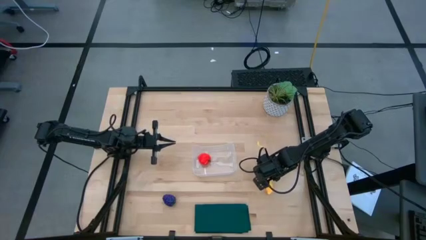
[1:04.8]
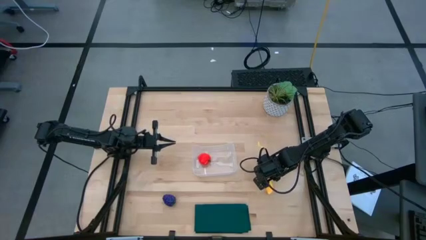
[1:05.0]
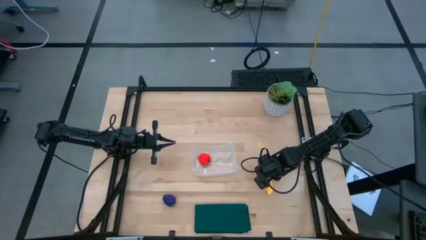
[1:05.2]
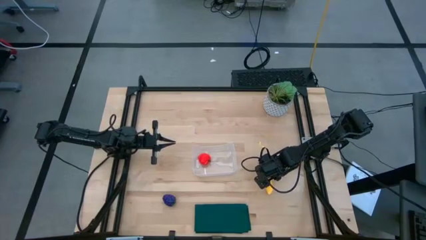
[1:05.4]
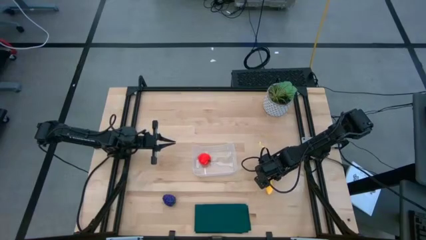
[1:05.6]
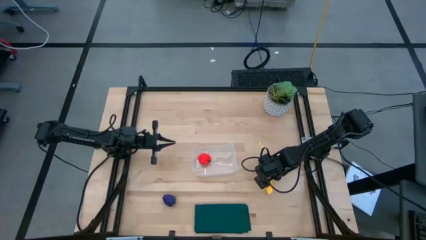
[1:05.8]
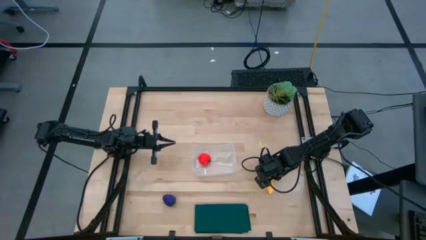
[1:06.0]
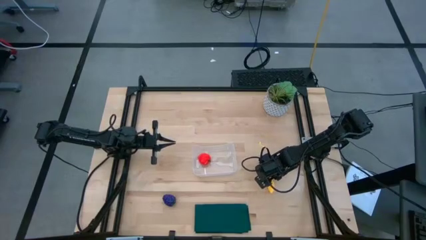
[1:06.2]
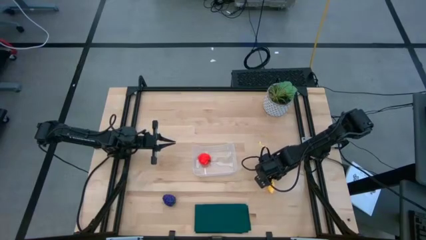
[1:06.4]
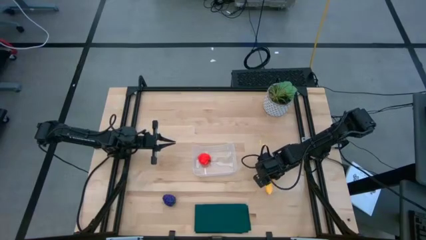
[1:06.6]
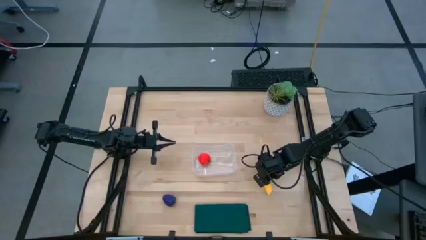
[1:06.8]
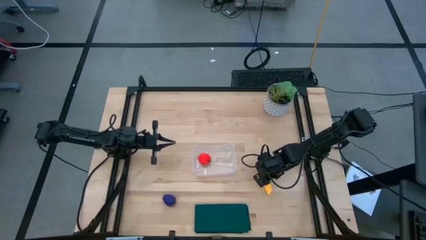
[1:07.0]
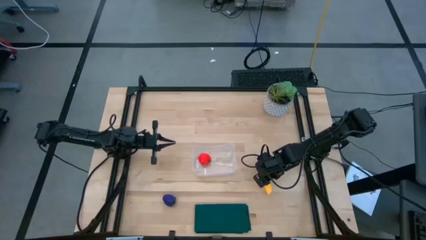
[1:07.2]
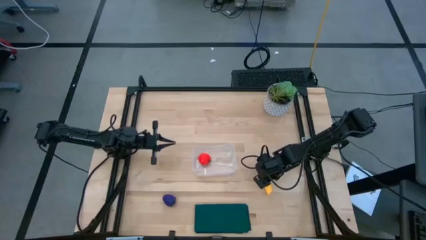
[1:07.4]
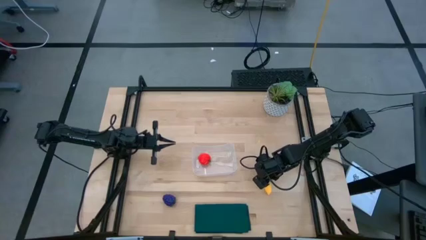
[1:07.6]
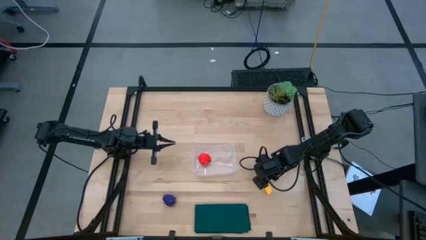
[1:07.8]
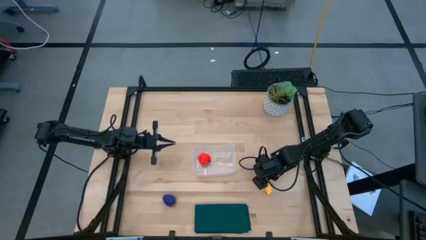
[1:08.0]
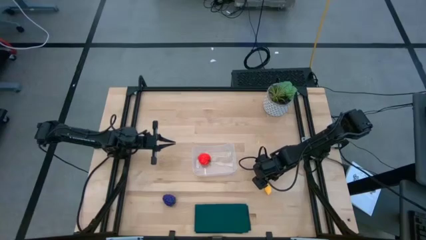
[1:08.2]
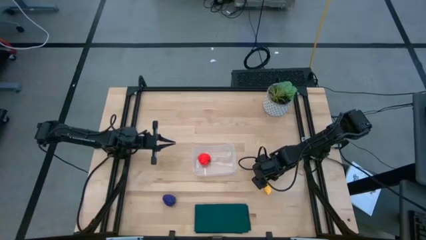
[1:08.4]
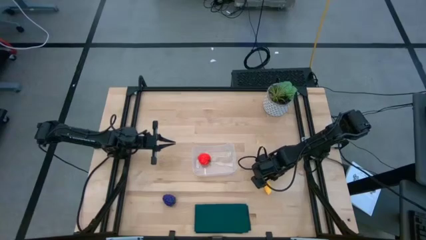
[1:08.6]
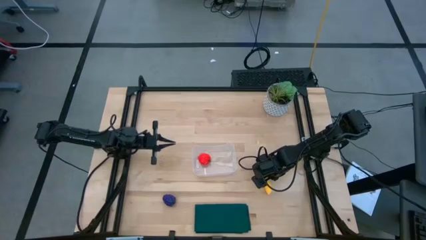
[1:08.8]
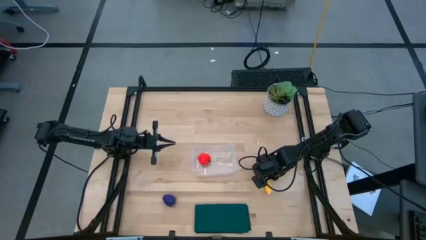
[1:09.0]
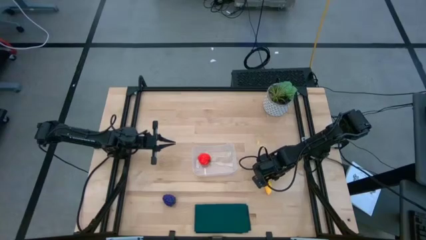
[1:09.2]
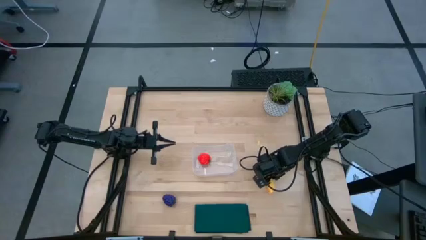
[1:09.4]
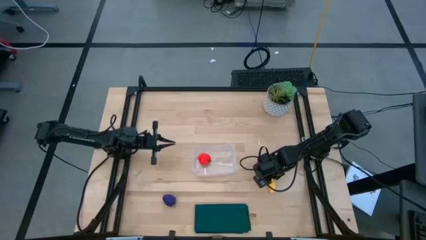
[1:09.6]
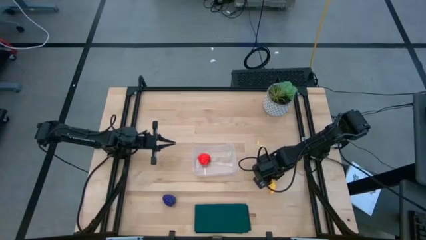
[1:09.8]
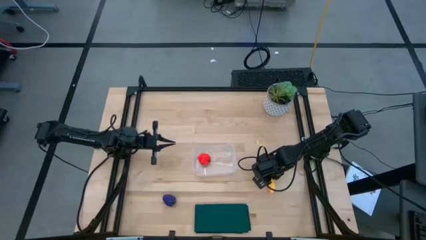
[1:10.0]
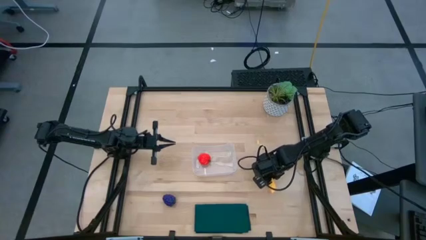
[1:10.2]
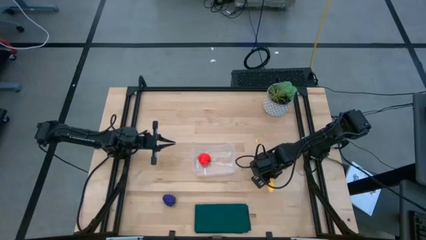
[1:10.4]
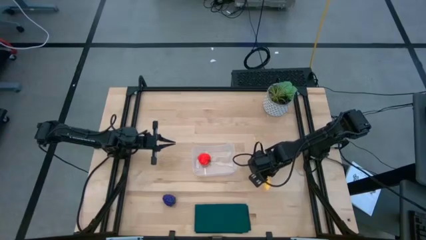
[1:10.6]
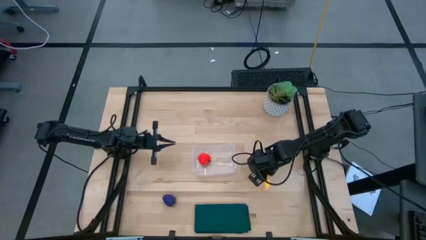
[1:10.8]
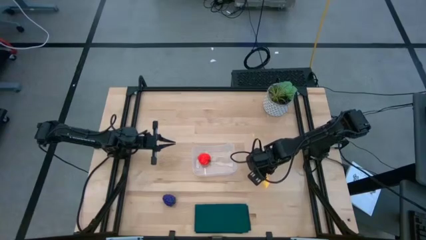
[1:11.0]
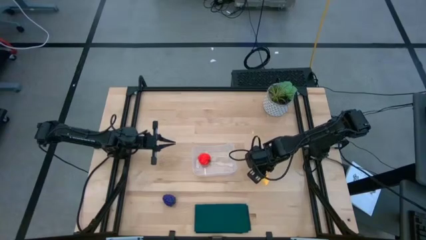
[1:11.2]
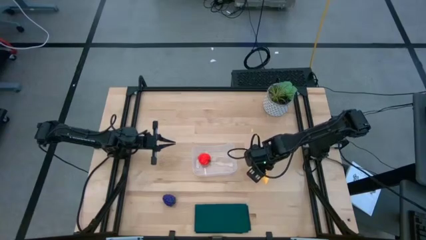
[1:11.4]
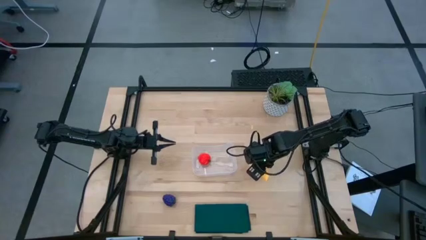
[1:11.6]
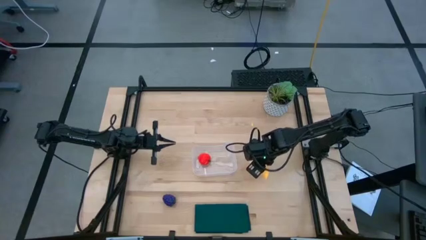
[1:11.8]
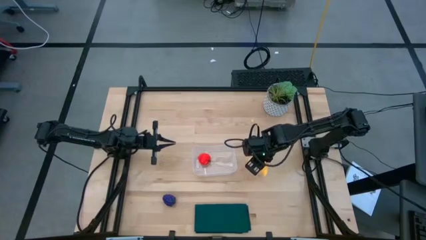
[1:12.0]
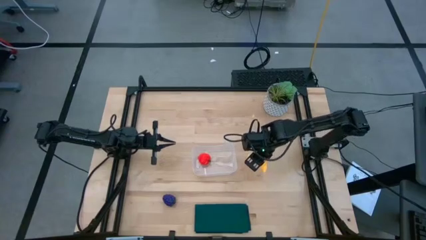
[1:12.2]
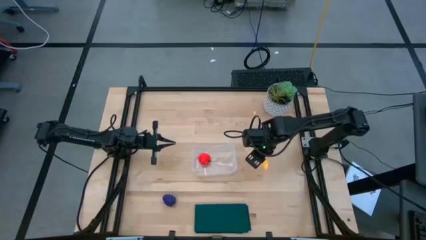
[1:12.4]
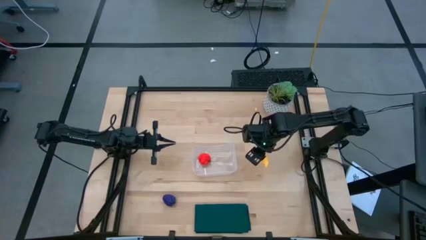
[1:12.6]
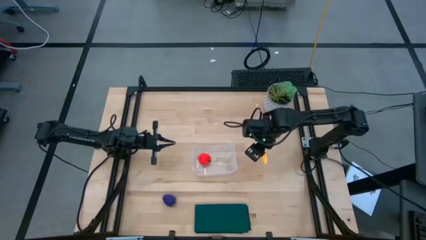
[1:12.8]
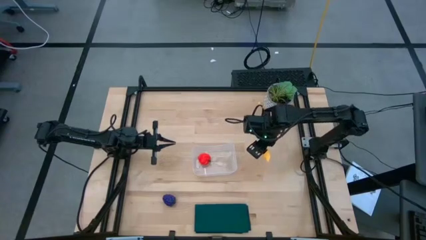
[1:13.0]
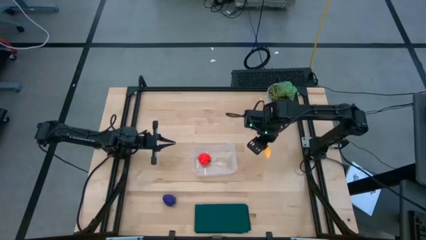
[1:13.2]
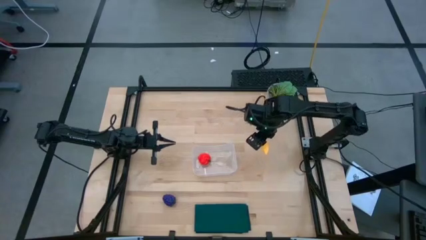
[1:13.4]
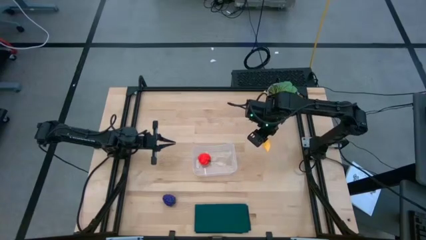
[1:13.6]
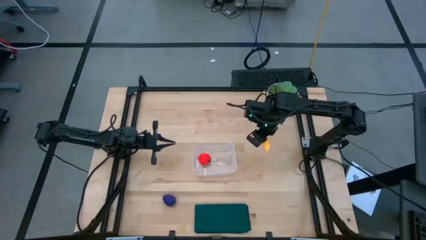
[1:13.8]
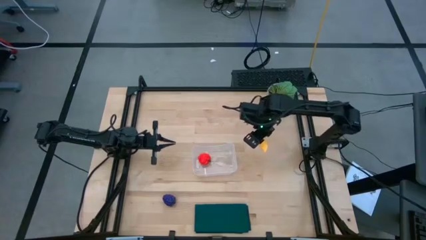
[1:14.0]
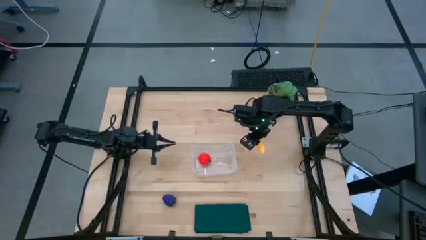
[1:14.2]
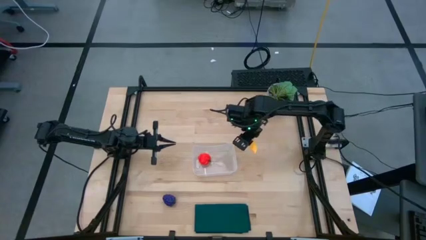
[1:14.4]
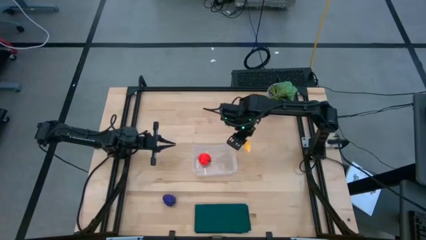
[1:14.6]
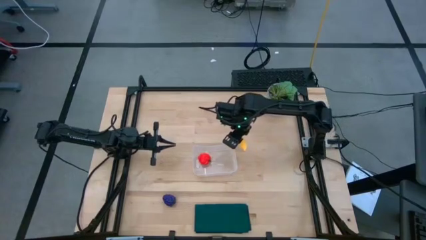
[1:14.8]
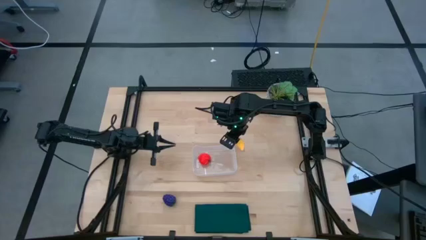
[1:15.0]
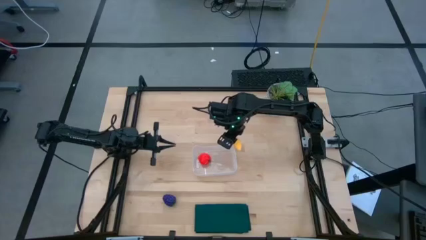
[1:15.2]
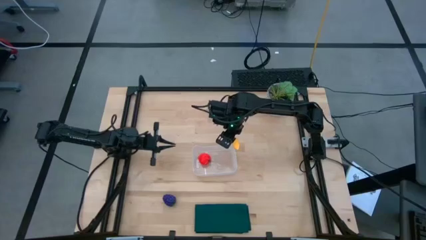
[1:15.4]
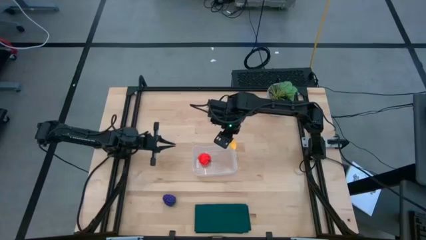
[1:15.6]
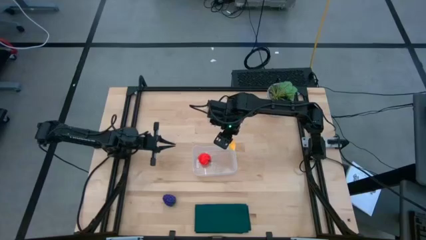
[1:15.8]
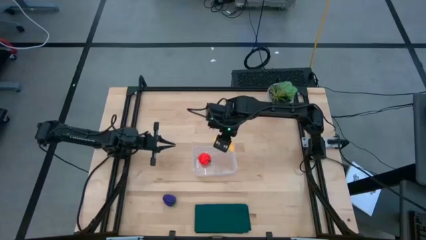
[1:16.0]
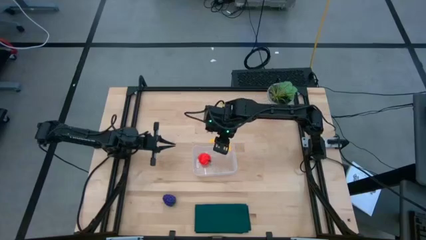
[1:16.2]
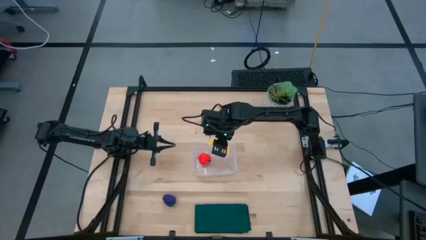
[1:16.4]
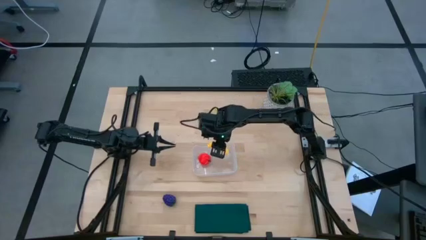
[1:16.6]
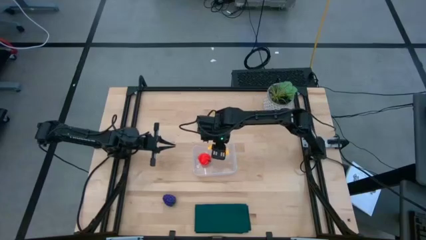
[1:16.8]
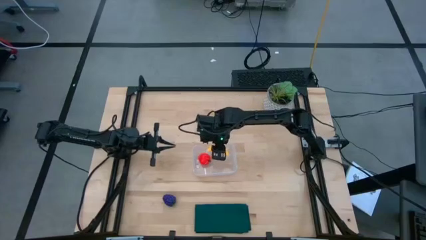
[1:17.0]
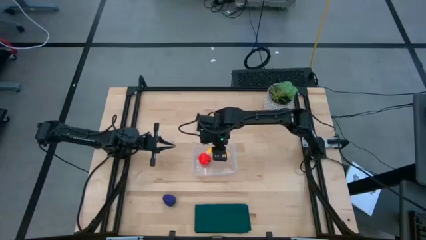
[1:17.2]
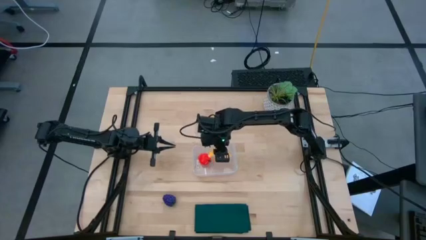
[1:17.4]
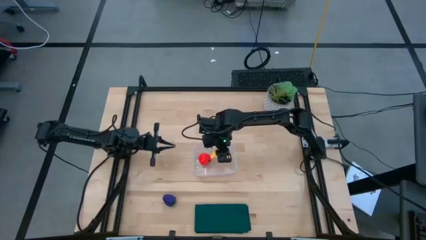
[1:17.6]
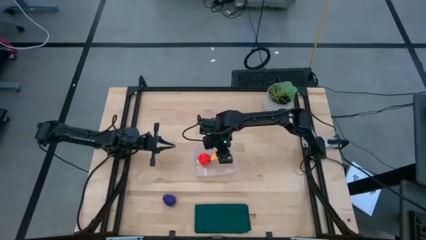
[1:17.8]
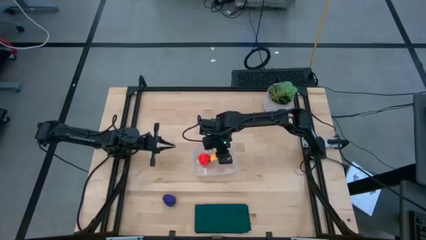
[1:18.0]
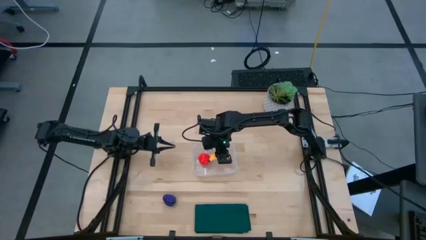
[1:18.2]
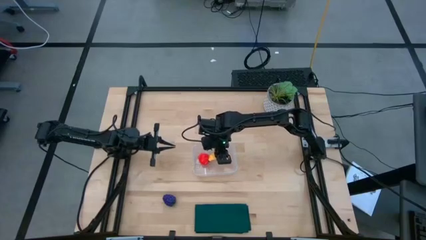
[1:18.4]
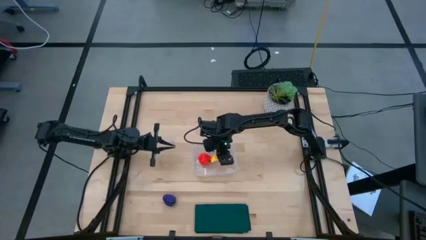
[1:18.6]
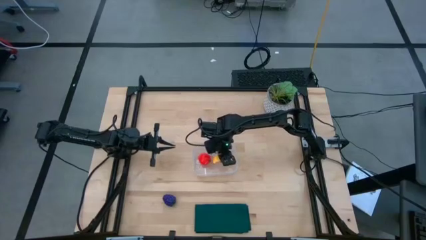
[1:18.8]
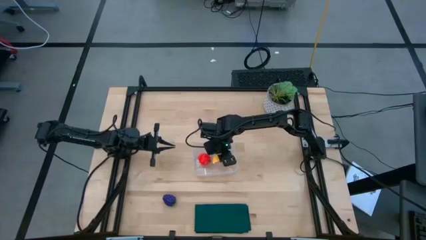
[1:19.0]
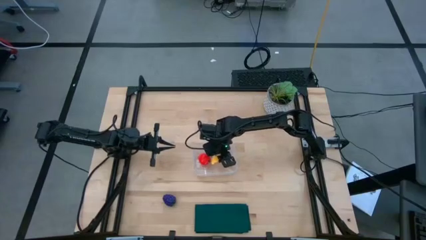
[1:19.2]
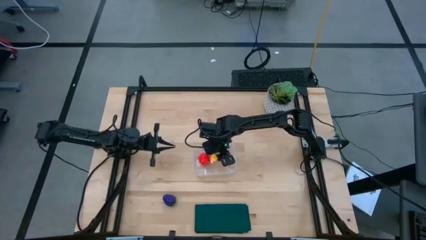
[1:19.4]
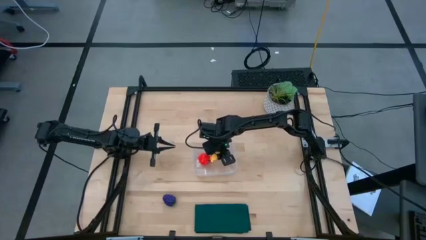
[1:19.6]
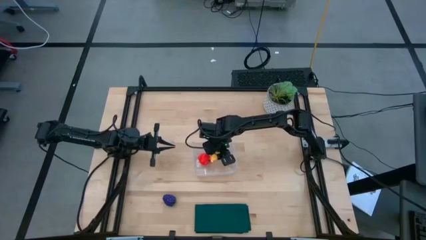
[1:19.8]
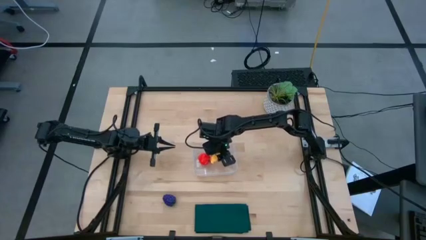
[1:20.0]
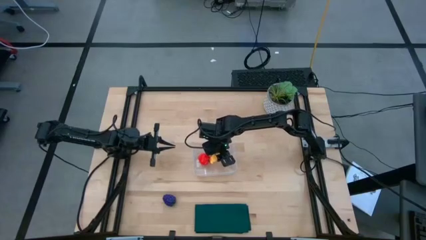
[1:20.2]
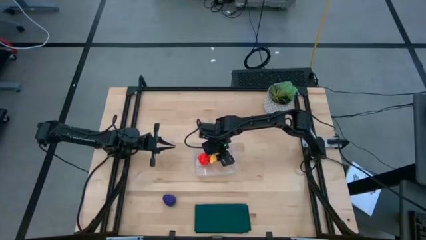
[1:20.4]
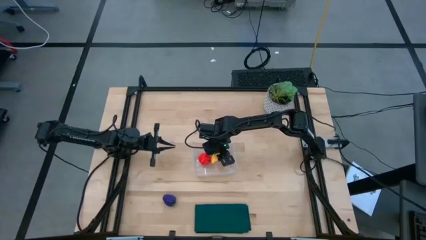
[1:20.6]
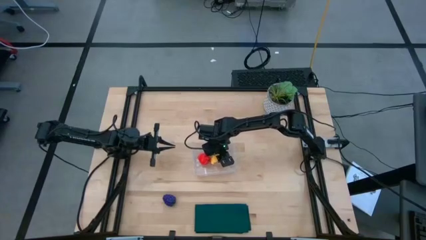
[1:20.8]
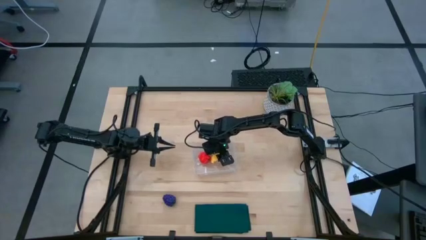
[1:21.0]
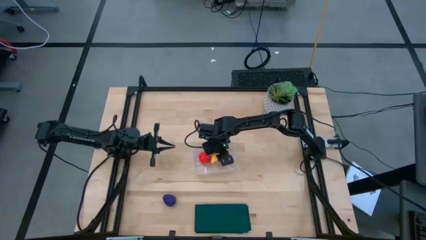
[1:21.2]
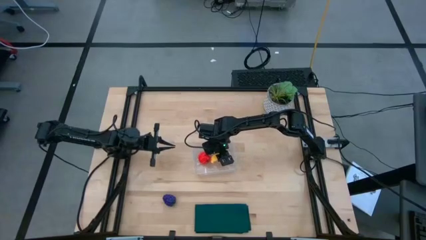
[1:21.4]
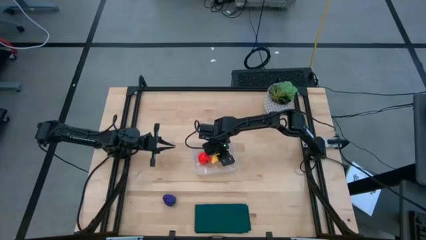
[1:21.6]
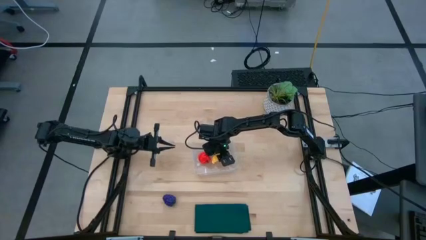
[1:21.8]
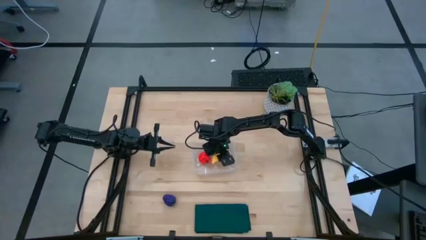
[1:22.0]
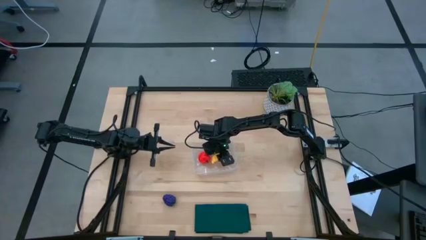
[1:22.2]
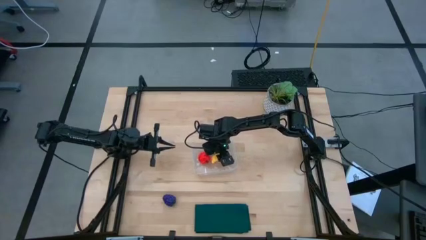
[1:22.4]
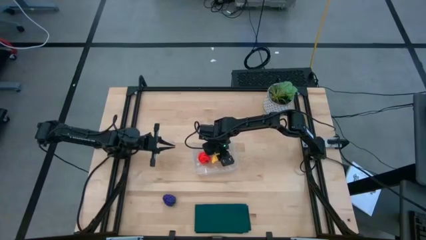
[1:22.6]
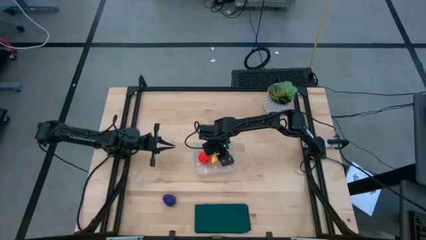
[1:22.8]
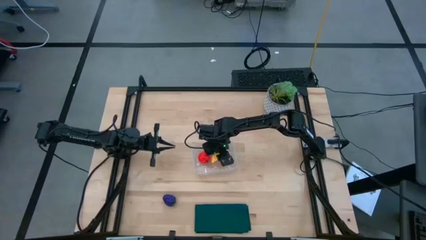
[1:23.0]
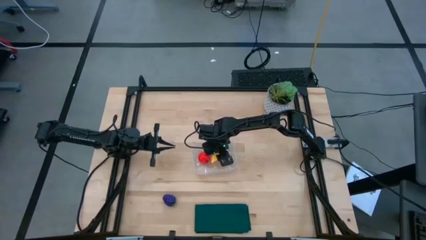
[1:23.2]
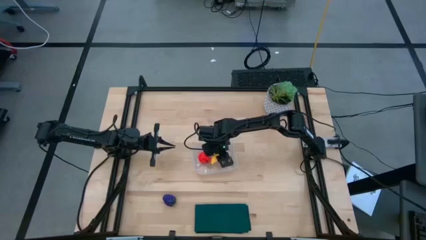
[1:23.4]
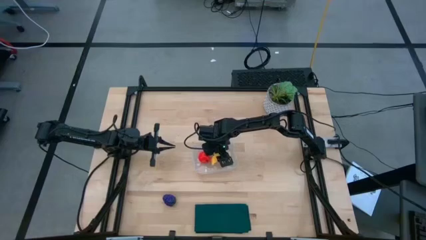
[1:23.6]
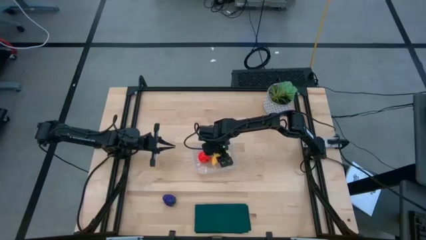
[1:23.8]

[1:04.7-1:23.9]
Task: Pick and placing Produce into tupperware
Put the yellow banana into the transparent bin
